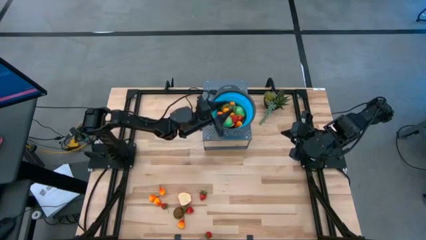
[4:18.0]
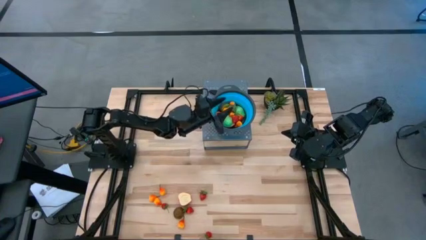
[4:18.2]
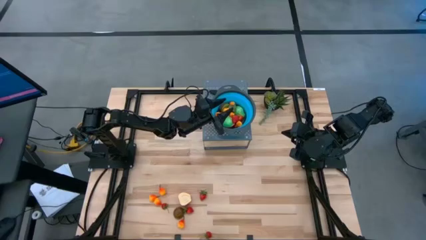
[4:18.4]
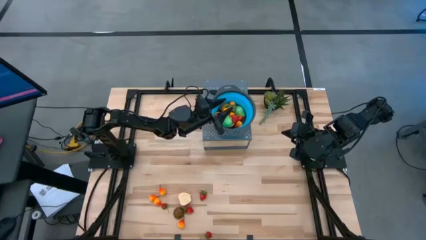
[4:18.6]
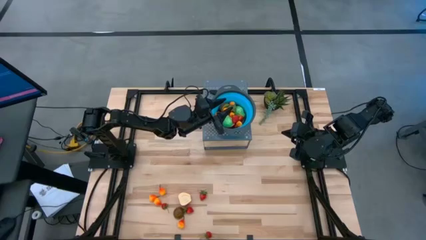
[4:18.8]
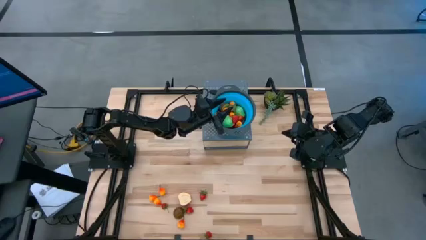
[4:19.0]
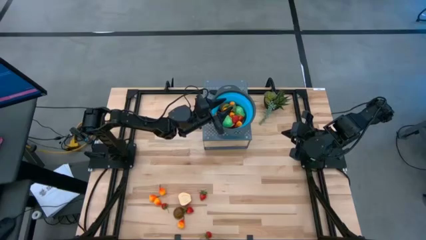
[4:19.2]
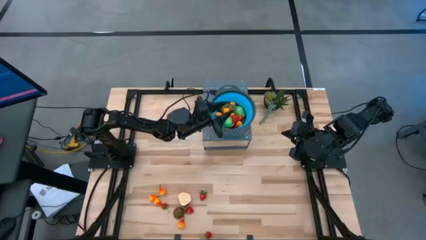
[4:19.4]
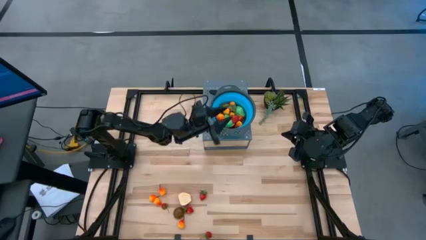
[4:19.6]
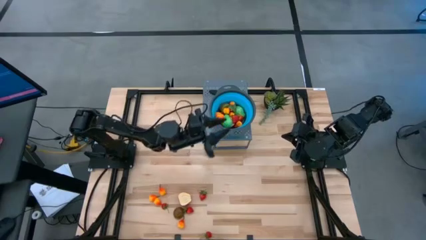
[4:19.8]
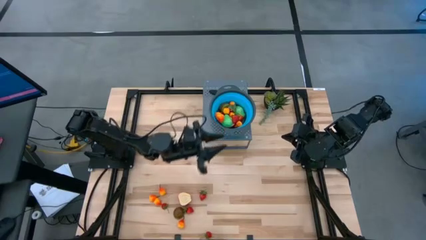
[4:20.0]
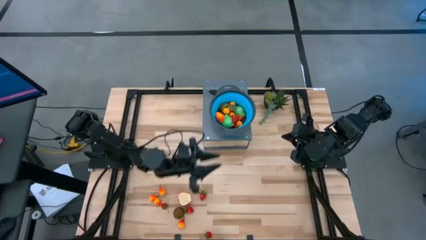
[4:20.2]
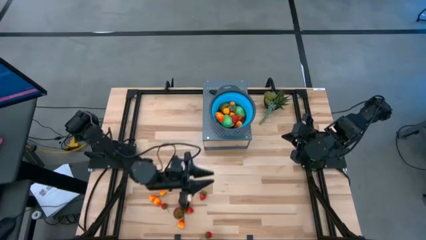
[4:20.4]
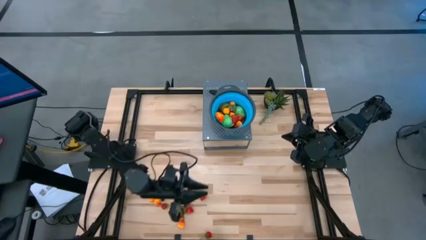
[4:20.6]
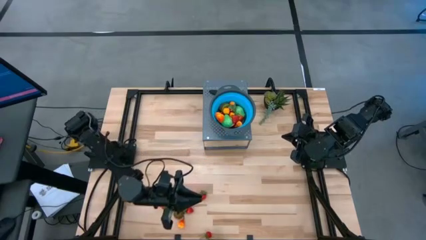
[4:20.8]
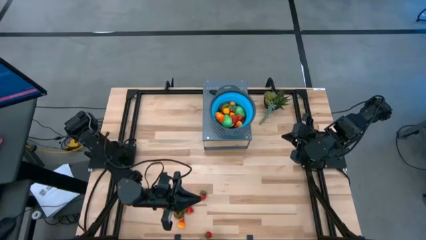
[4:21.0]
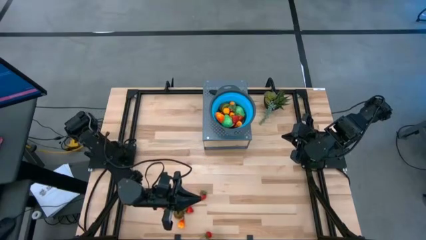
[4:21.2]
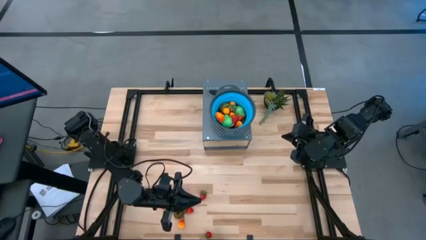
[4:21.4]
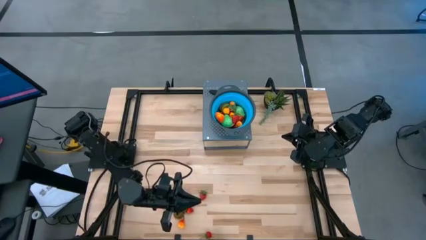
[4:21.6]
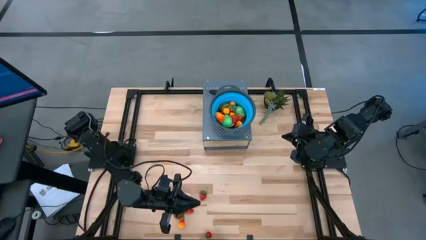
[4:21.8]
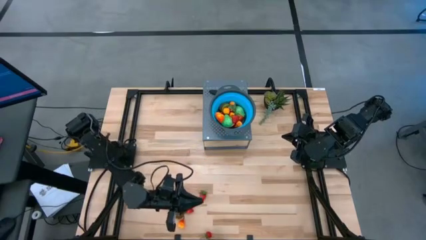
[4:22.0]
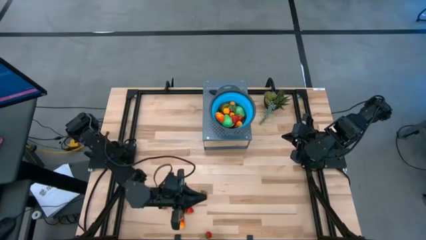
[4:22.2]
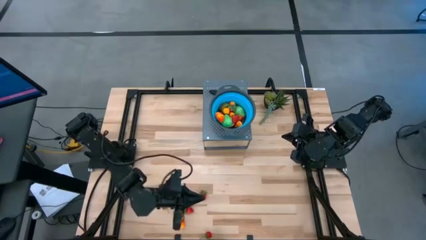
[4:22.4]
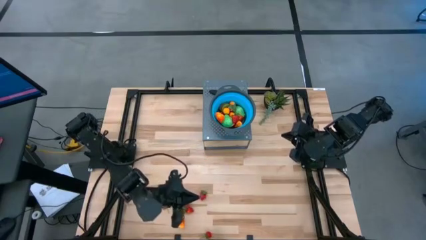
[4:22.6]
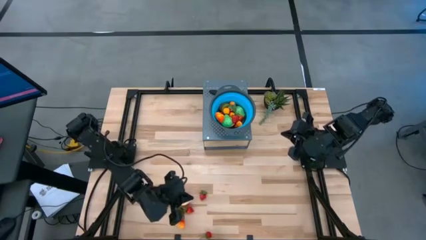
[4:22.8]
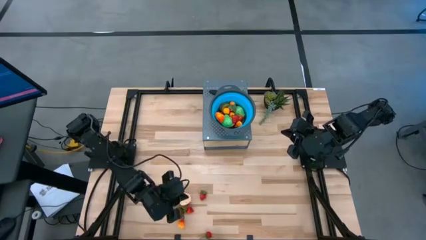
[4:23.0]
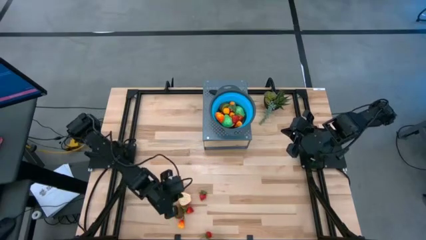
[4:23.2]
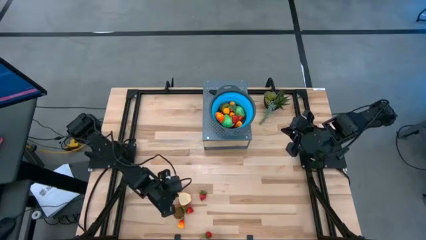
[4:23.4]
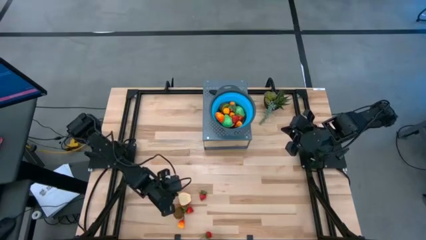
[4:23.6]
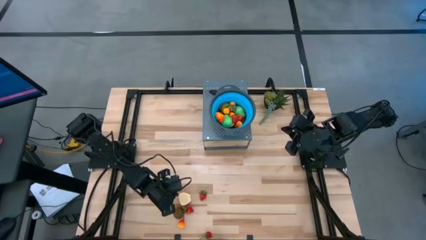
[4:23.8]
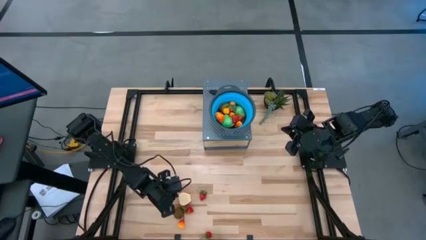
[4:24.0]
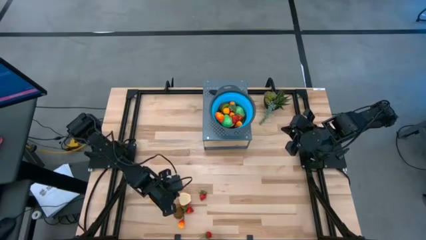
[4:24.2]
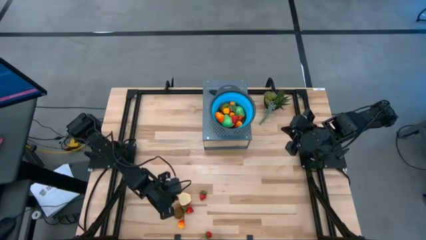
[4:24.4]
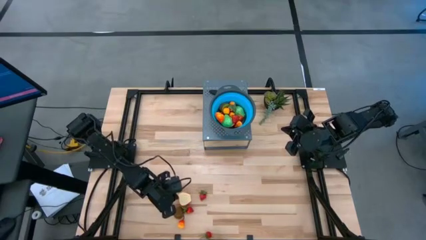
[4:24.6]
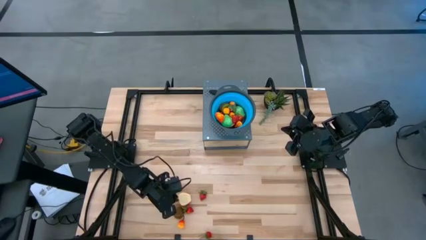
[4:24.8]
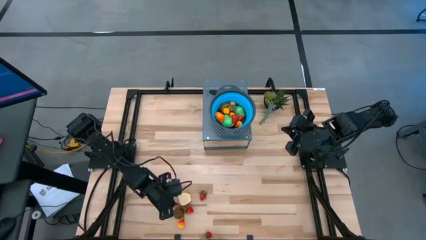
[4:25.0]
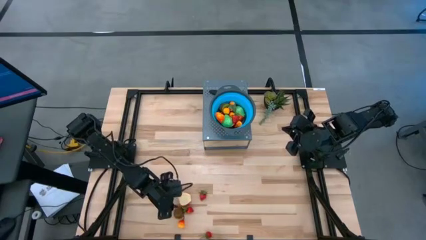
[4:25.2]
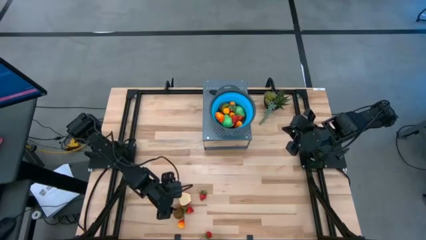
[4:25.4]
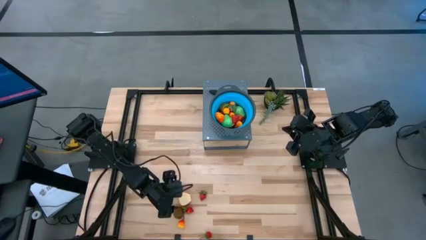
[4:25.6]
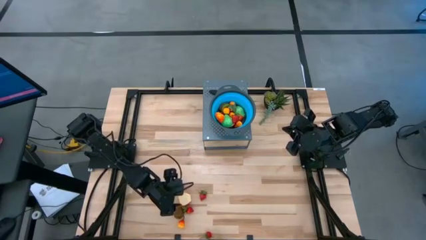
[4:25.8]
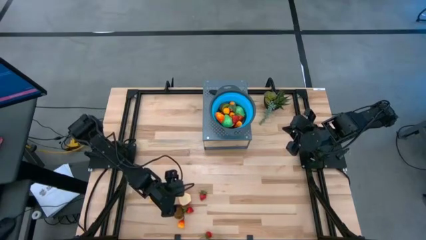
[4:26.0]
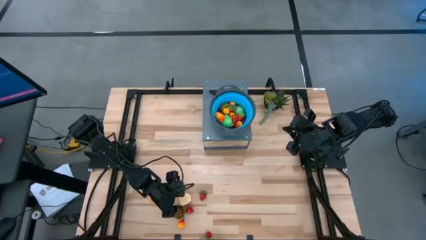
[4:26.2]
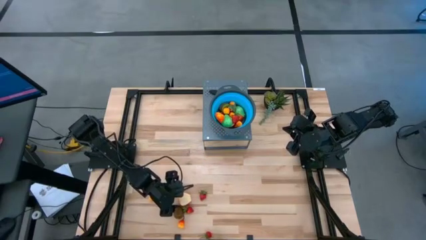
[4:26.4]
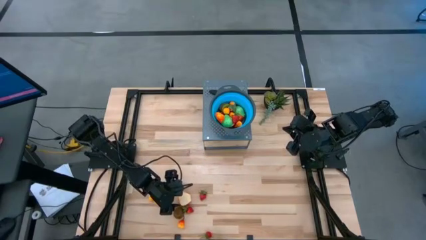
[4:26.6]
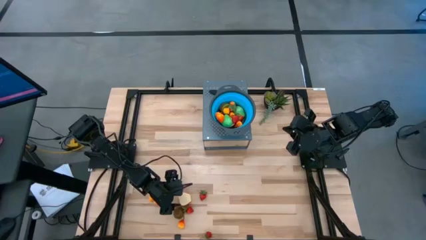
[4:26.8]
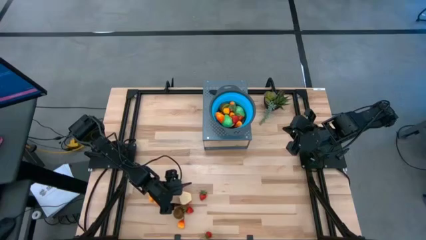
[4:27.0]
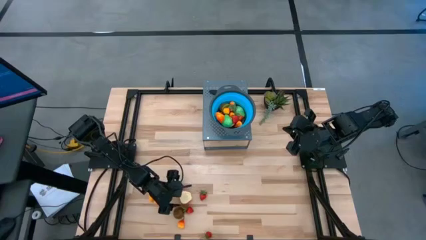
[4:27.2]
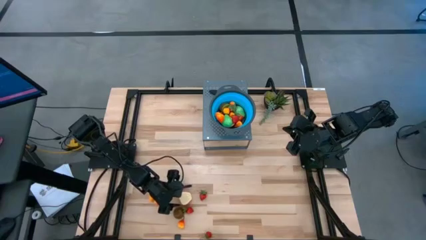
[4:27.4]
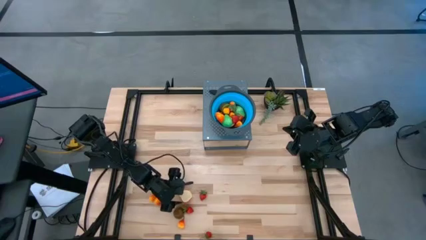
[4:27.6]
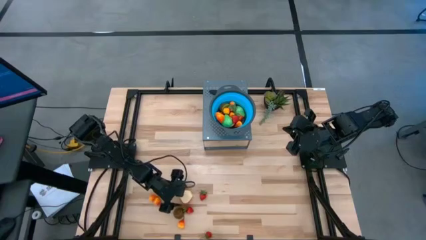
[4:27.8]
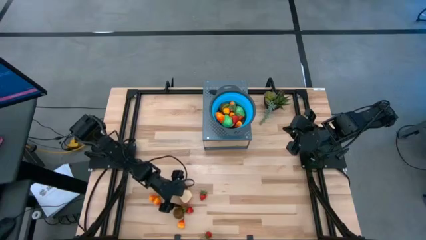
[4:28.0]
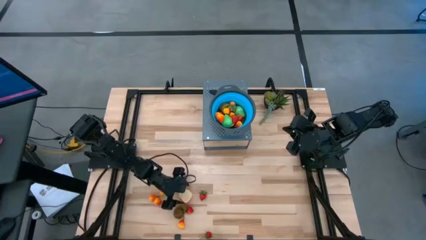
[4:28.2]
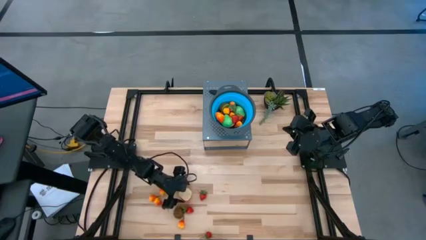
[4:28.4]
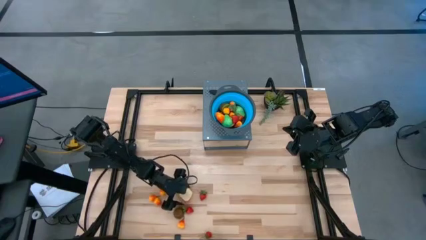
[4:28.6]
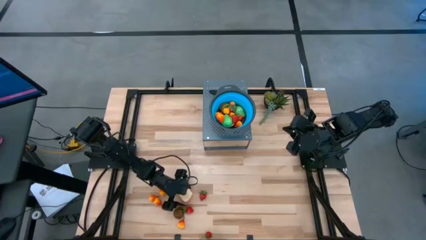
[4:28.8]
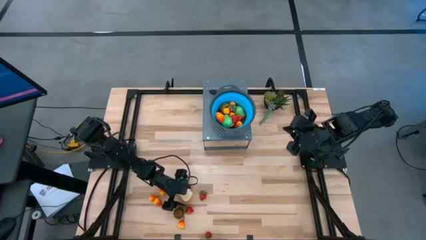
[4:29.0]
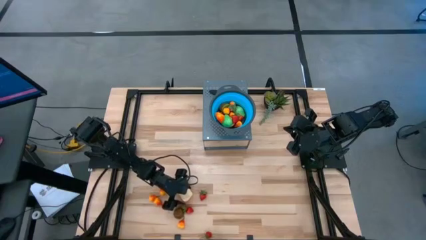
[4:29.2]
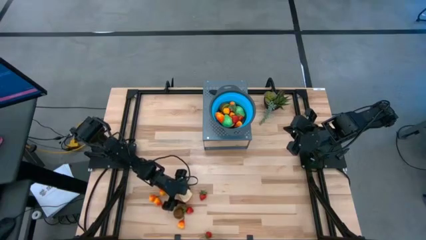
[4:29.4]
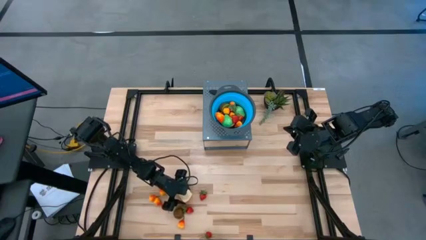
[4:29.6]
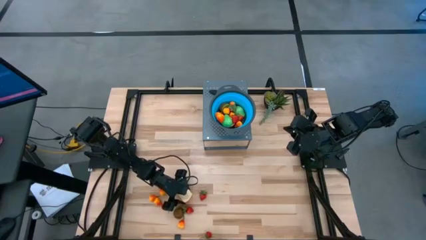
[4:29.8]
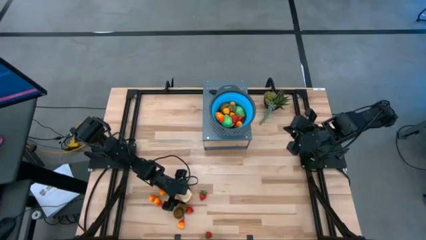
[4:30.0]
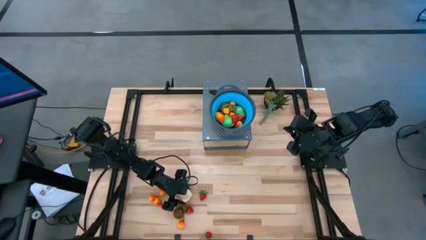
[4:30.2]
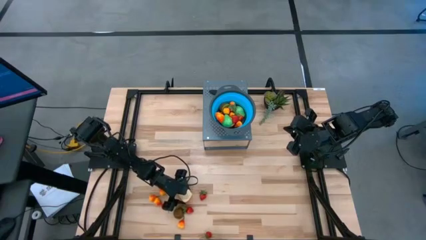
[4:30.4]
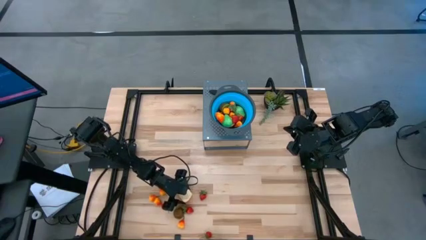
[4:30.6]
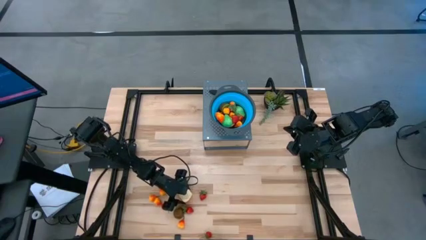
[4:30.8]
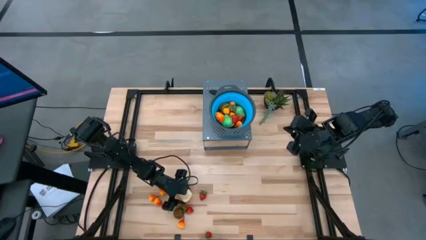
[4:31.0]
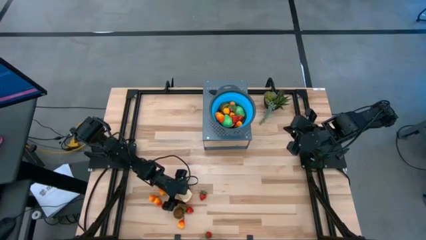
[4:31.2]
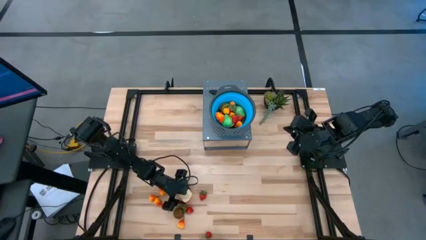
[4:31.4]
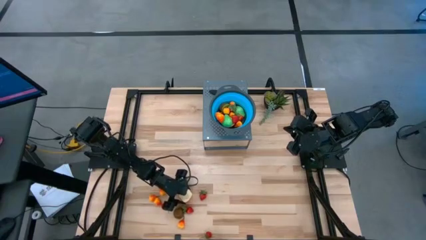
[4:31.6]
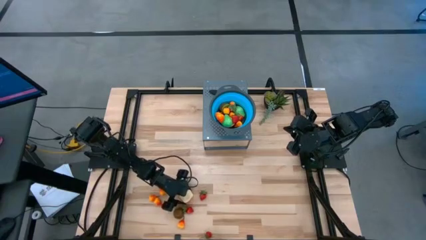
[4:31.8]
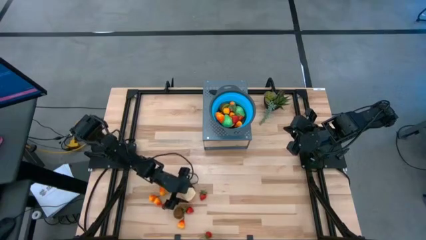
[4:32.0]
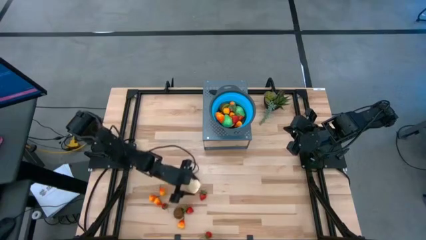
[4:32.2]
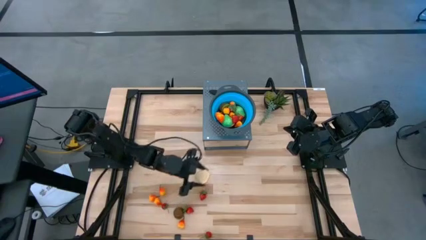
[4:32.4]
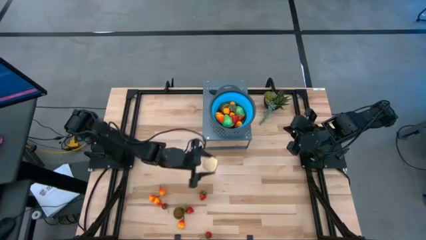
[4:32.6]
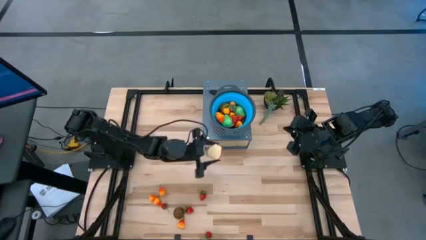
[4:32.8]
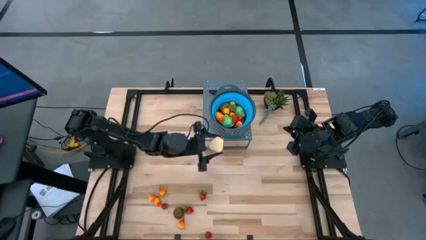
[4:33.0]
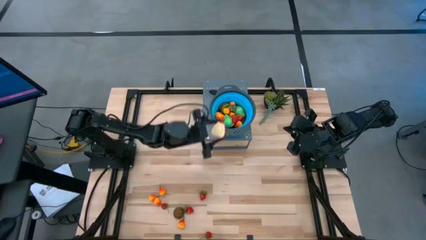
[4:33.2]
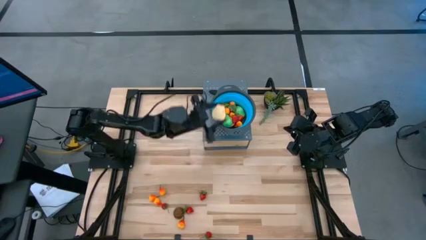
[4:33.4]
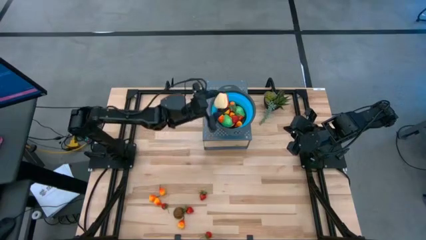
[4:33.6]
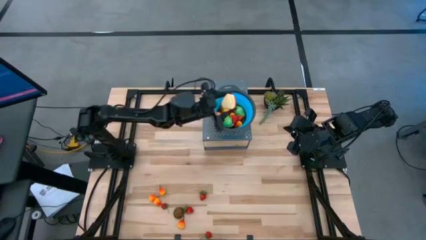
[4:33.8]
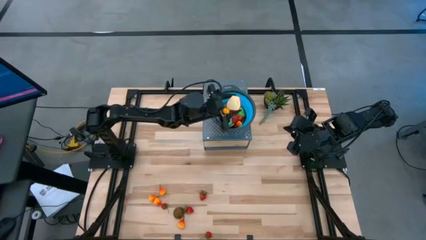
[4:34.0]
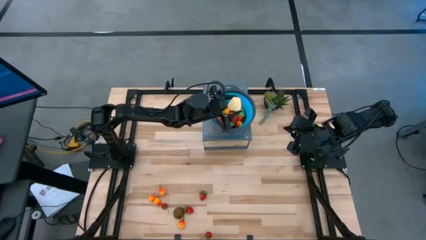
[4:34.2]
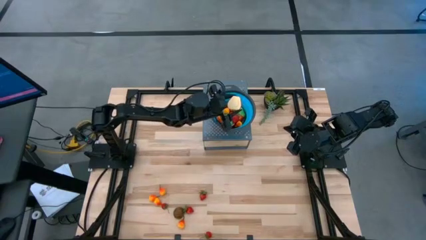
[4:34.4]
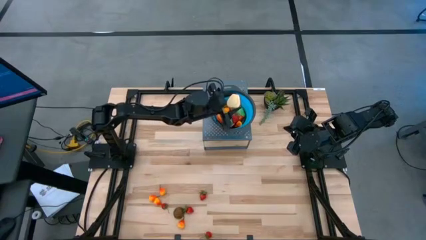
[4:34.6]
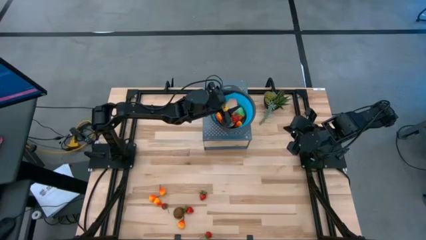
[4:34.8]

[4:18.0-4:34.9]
Task: Pick & Place Fruit
Put the sliced apple into the strainer bowl
